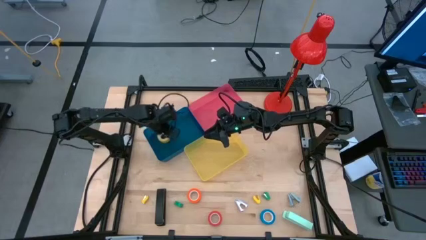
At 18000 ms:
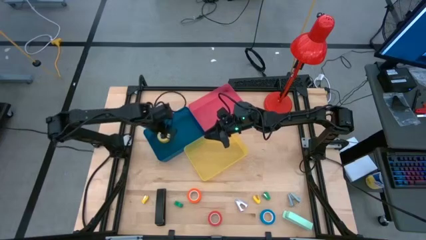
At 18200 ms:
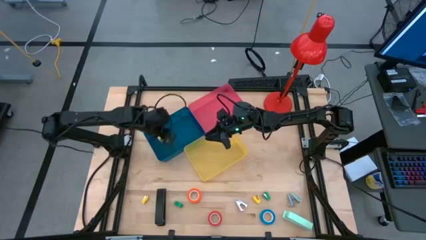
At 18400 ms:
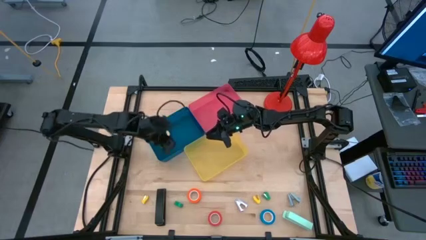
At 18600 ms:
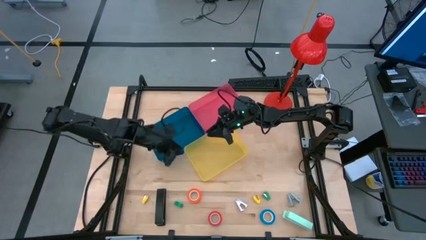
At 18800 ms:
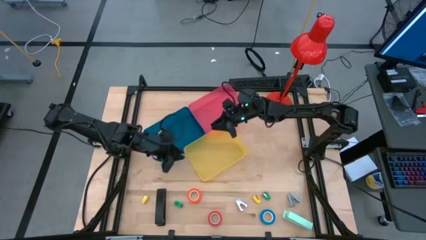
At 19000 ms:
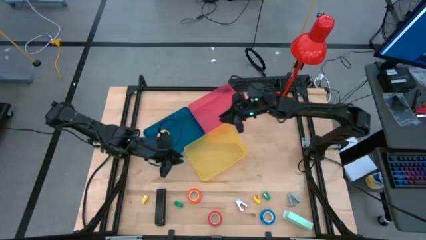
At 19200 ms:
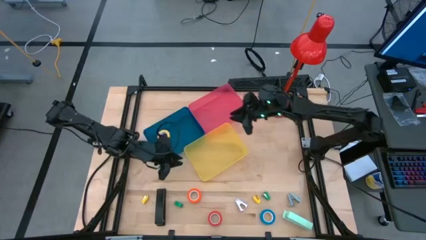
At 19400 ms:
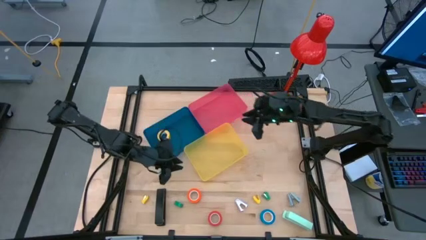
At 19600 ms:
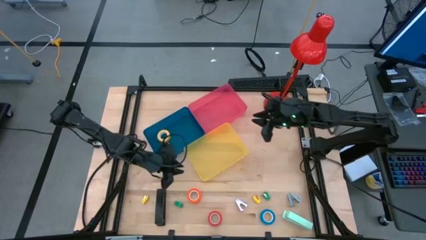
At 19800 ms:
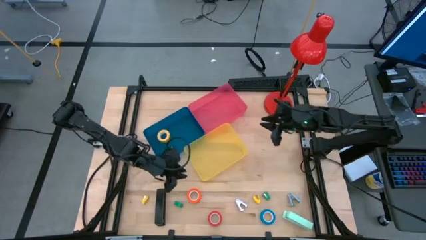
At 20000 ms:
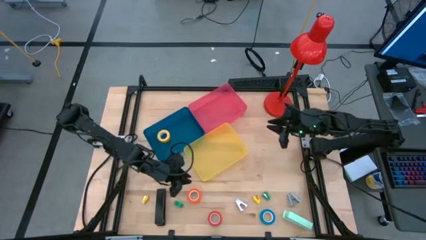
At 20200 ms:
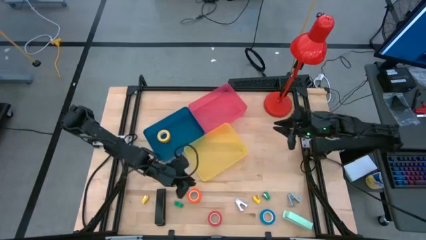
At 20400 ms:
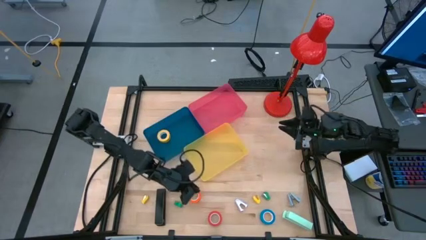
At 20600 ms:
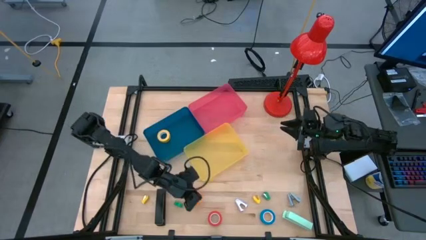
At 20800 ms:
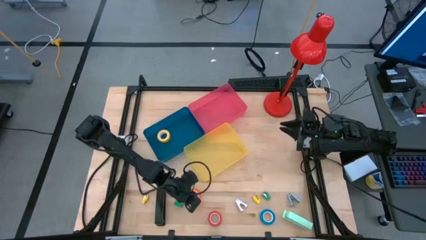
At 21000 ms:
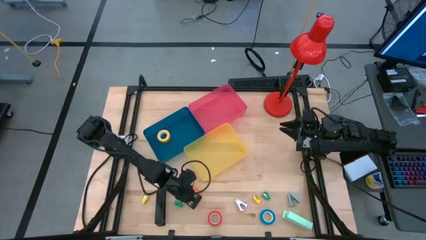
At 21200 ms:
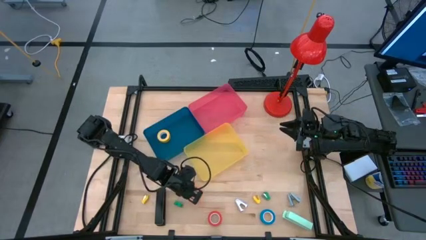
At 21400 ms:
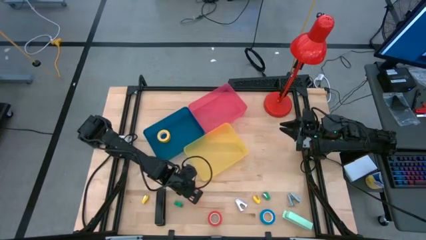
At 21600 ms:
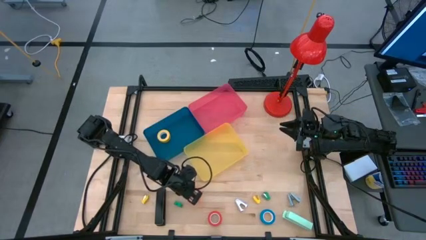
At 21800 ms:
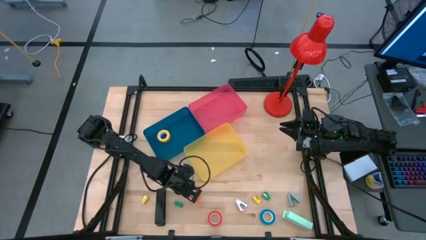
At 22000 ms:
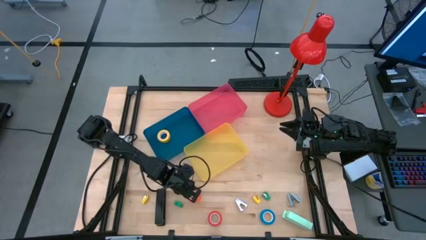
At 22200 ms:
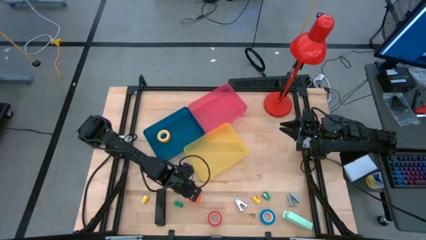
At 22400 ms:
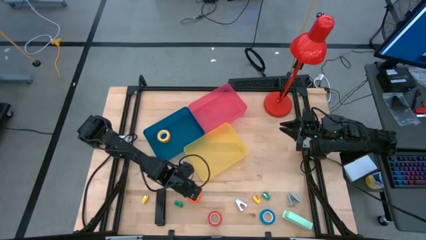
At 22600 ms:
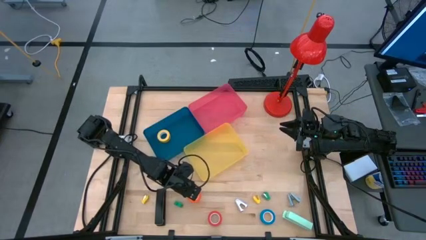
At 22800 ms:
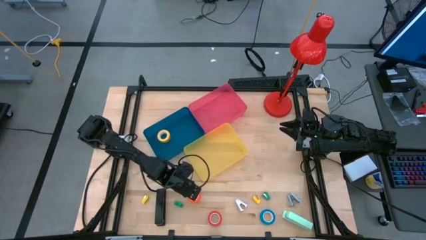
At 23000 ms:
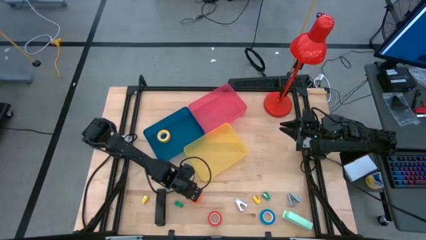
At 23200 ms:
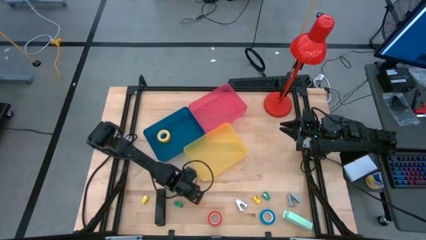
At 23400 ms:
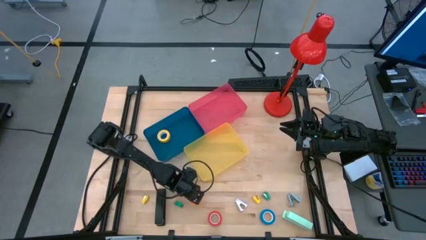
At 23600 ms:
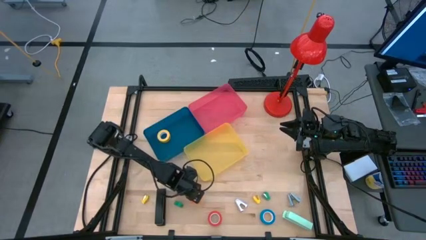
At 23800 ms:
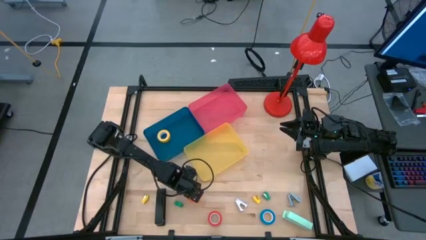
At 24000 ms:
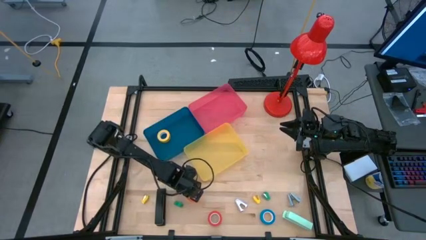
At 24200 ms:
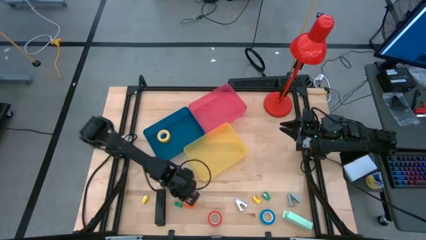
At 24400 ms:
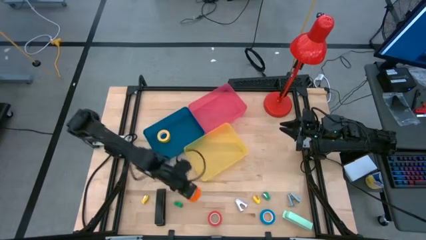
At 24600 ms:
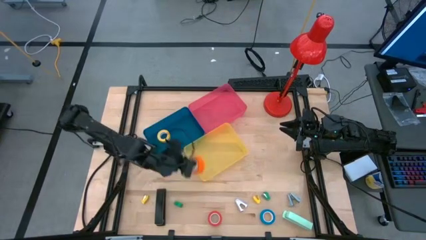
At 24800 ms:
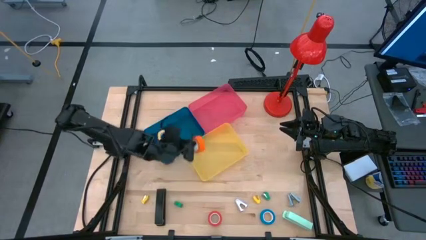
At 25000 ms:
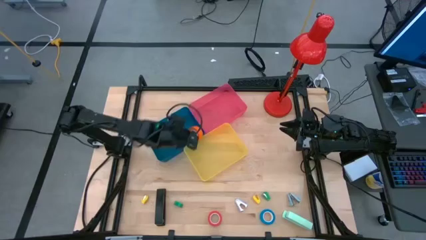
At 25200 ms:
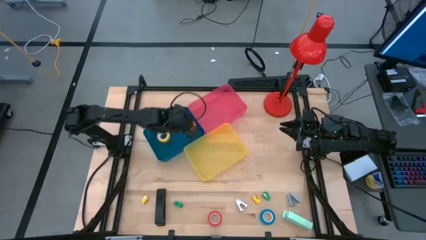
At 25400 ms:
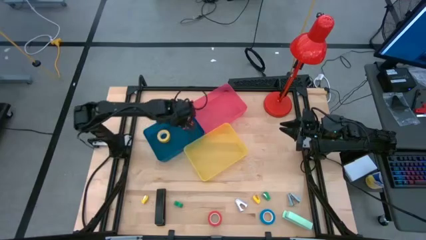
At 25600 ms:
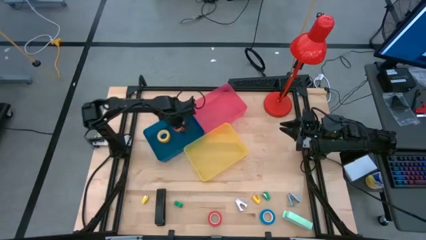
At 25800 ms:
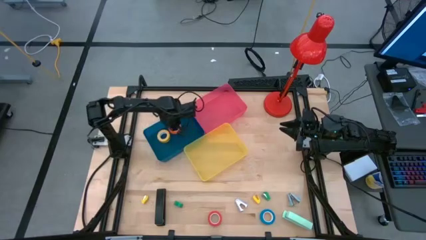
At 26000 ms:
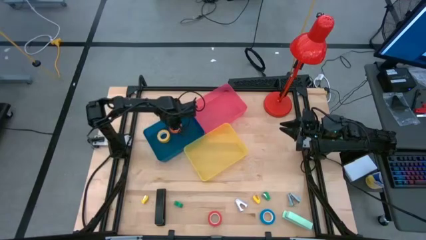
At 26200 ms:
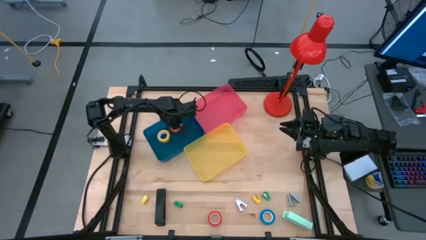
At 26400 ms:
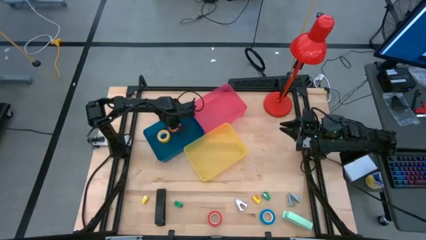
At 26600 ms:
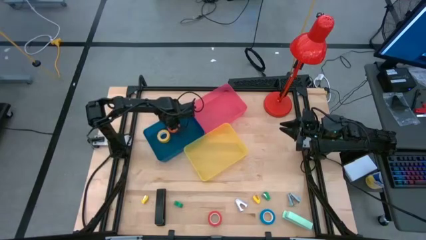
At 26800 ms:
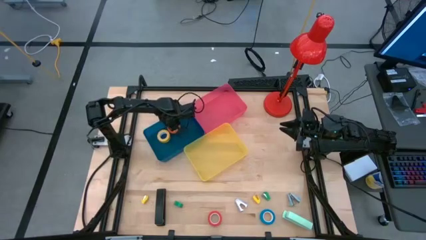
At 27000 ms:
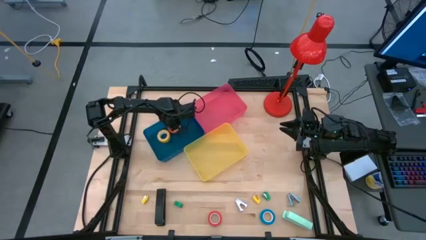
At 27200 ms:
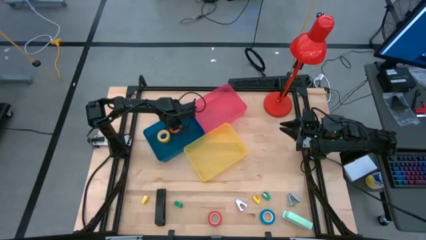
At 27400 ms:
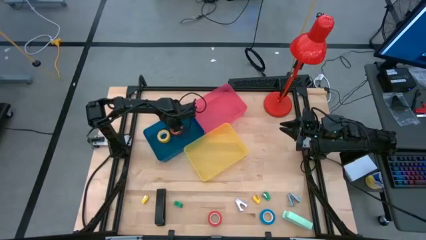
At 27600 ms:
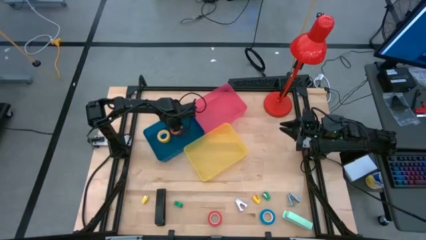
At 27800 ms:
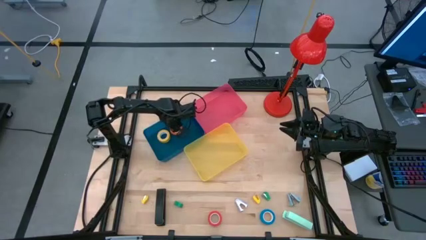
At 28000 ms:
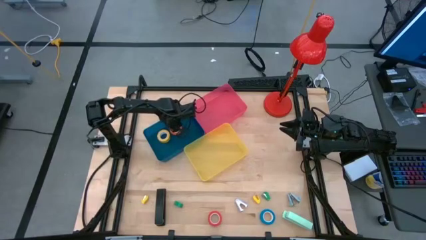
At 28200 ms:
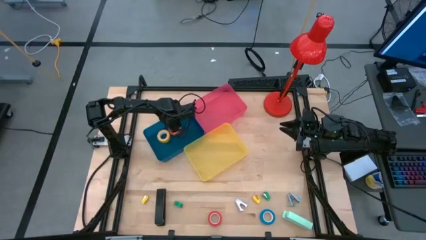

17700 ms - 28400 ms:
Task: Pick and place Stapler, Stapler remover, tape
Put the orange tape into the blue bin
